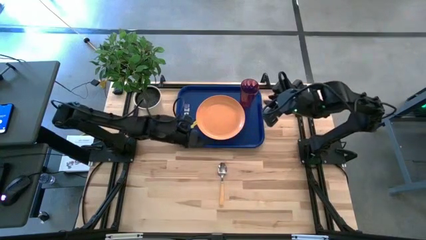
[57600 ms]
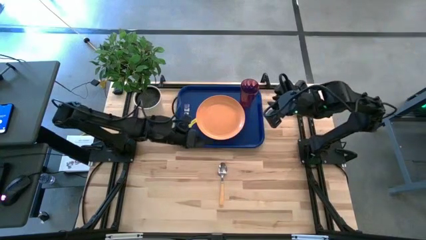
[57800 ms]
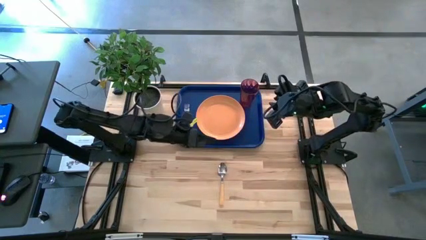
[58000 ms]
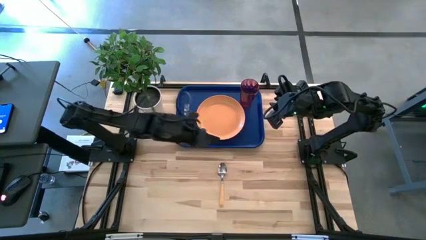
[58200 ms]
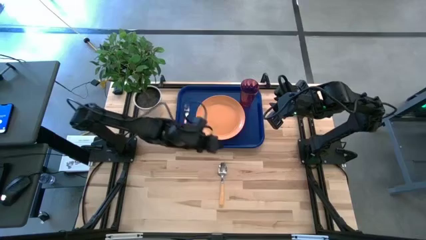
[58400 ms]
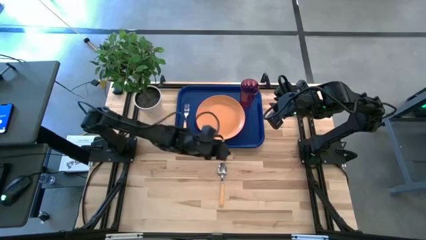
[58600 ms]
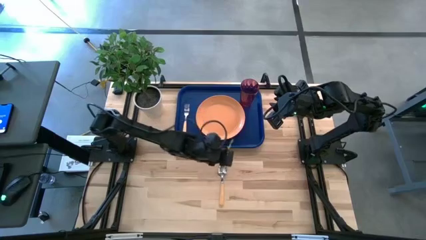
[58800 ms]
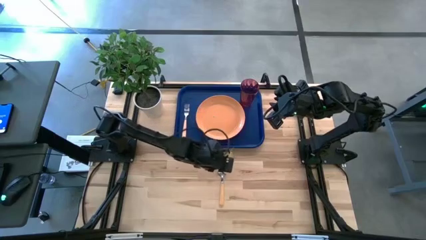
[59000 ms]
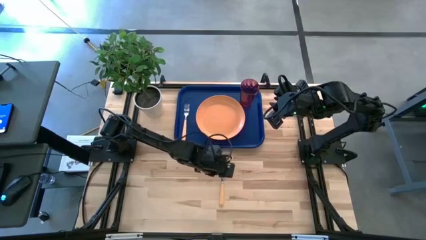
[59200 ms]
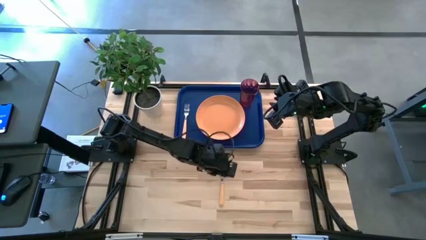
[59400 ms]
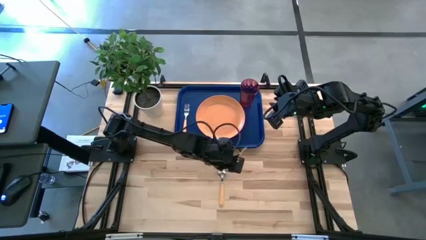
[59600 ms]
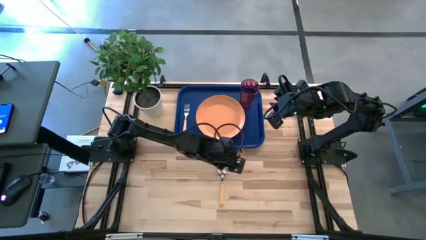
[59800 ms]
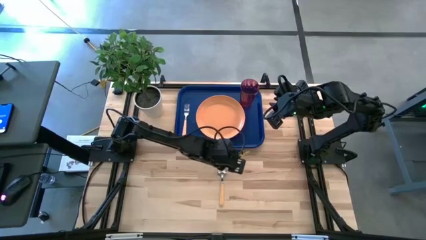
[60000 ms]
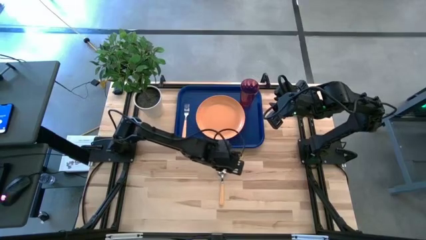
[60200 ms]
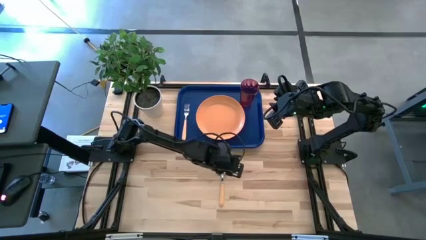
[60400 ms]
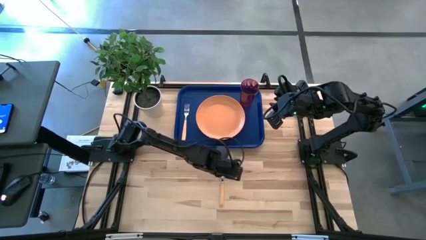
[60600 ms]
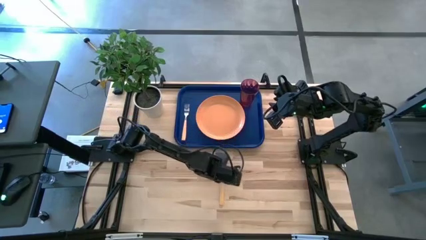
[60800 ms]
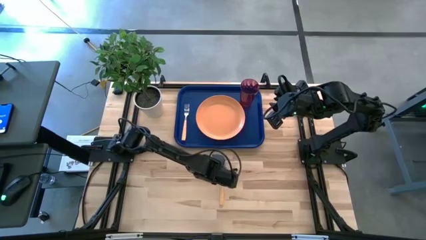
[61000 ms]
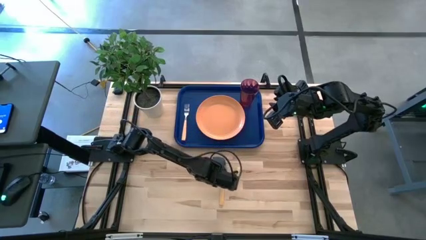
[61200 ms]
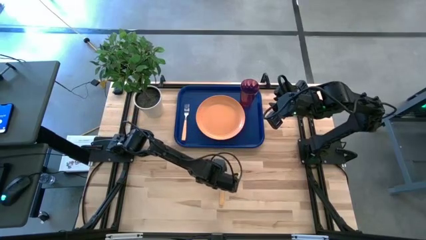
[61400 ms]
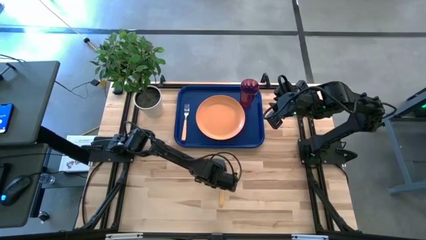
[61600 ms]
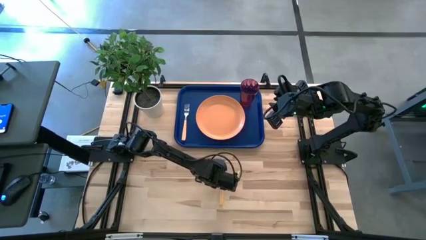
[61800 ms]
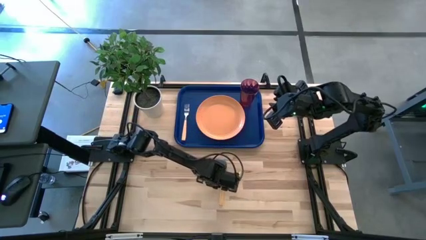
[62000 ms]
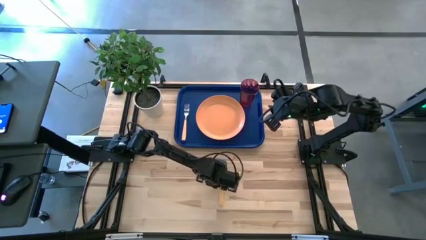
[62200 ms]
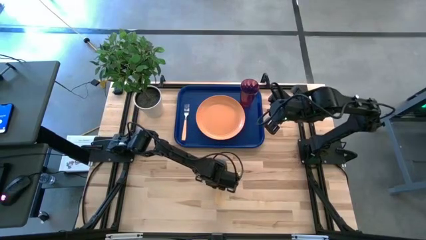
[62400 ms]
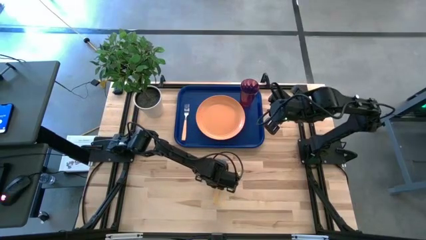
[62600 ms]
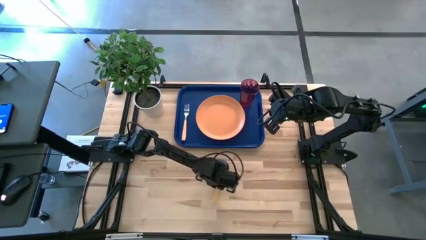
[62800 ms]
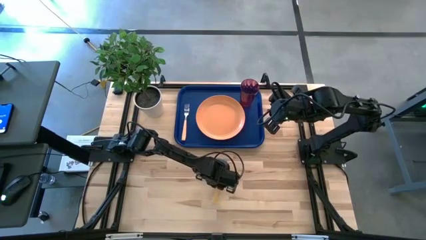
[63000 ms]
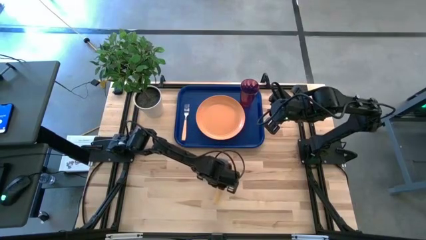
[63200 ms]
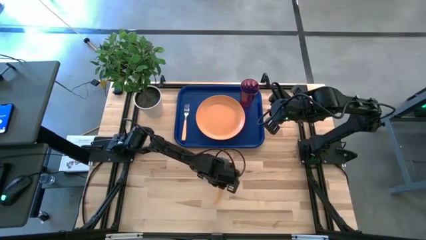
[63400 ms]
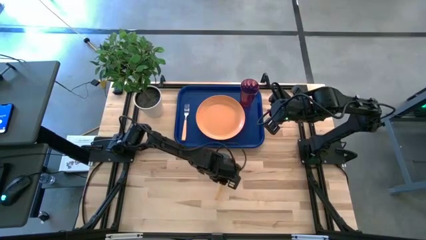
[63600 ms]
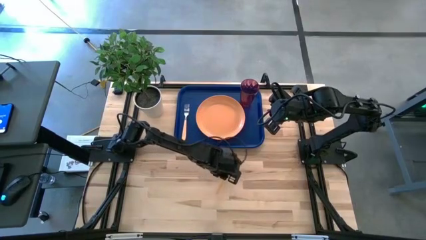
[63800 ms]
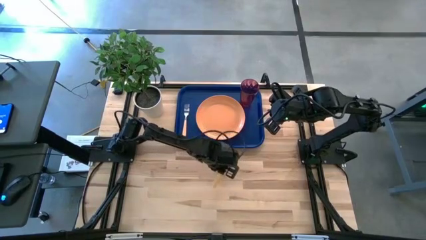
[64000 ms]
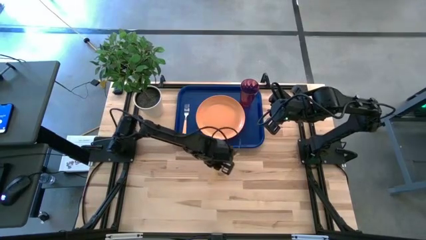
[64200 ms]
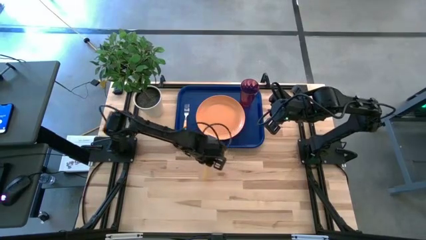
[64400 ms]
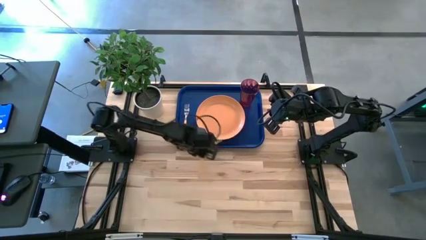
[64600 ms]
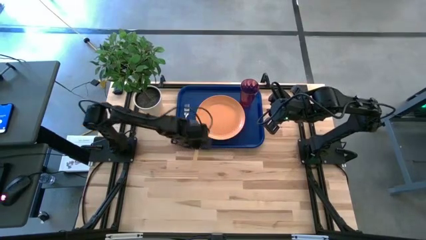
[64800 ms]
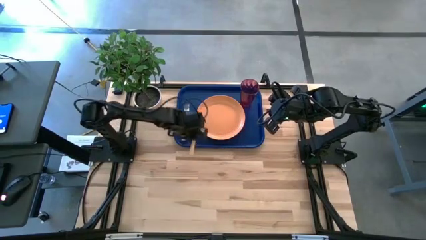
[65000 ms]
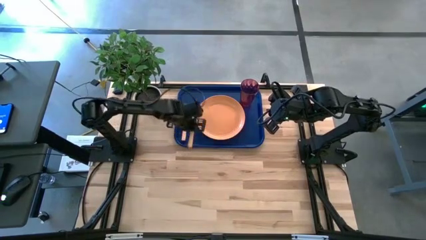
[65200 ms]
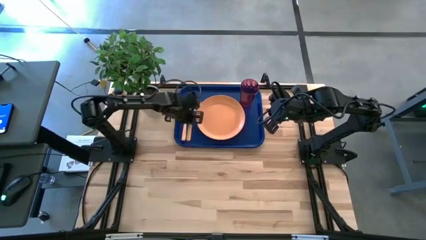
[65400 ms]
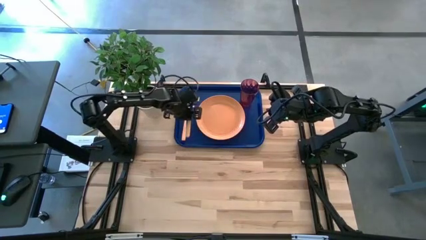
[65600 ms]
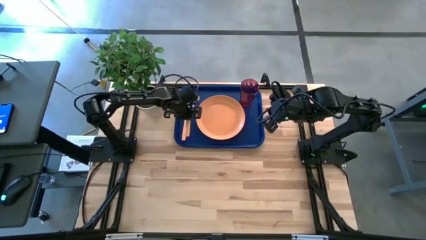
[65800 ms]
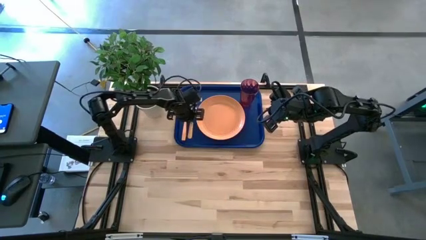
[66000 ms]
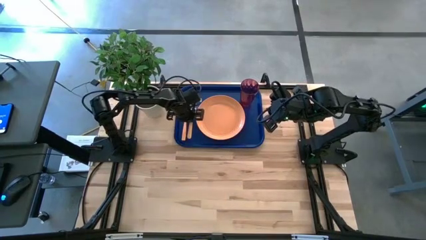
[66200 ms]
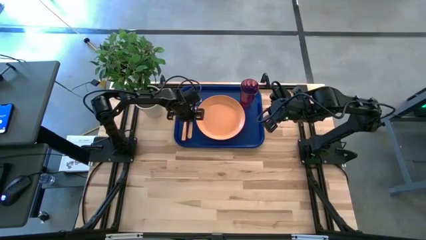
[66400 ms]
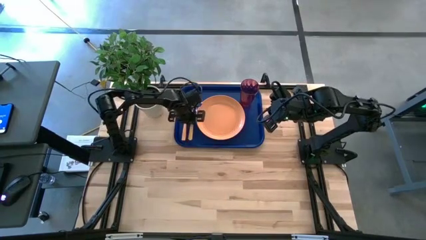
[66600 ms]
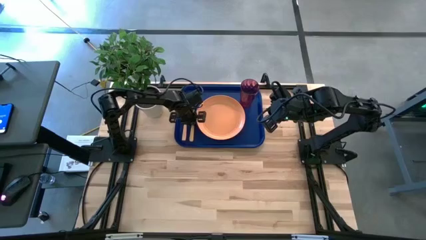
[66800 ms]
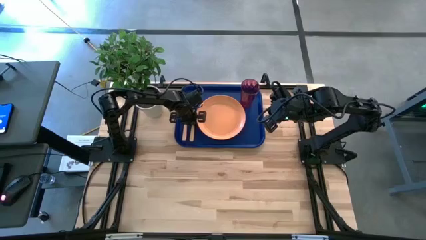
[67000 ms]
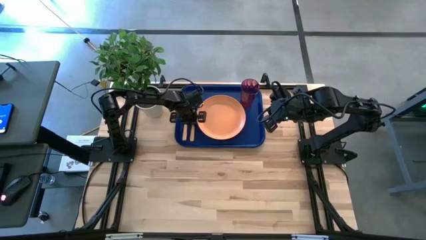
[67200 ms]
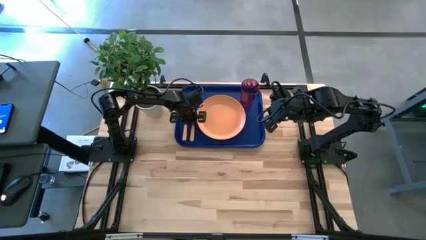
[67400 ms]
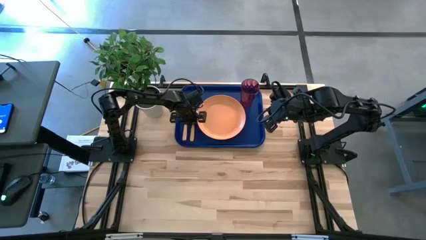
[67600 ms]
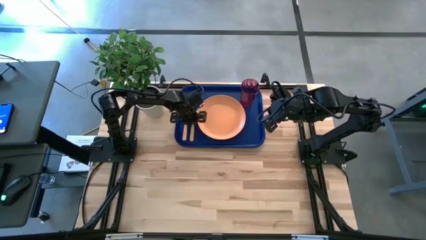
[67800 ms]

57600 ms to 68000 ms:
Task: Pick and place plate/cup/fork/spoon on tray
Put the spoon on the tray to the left of the plate

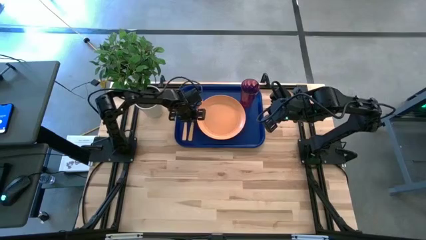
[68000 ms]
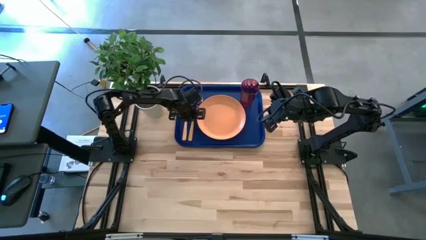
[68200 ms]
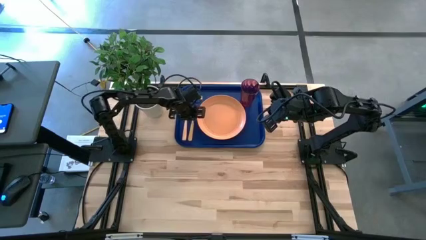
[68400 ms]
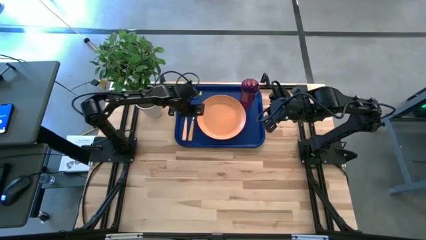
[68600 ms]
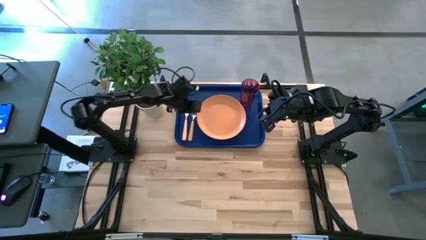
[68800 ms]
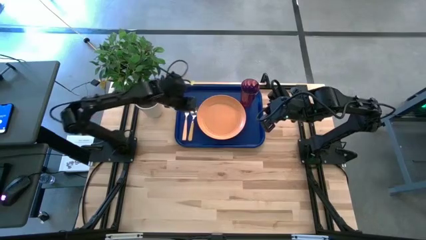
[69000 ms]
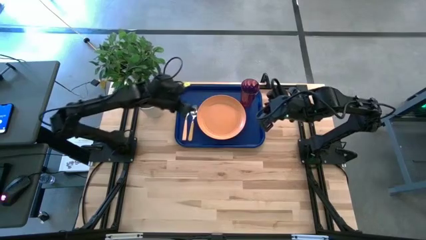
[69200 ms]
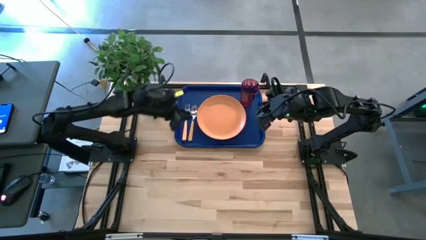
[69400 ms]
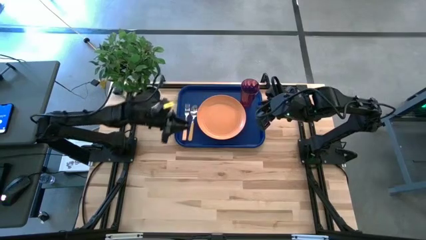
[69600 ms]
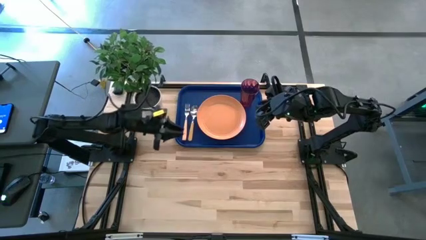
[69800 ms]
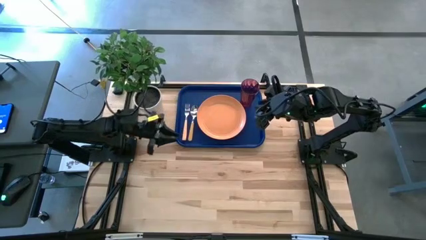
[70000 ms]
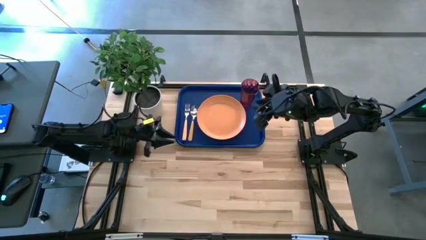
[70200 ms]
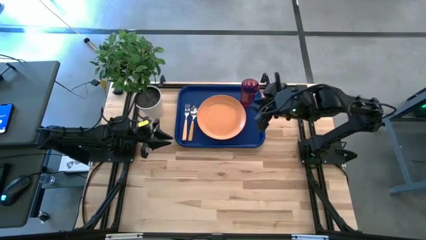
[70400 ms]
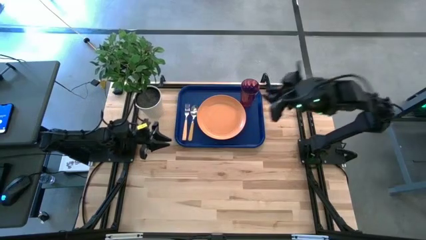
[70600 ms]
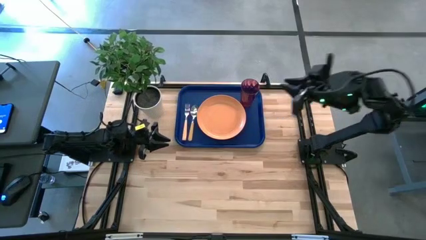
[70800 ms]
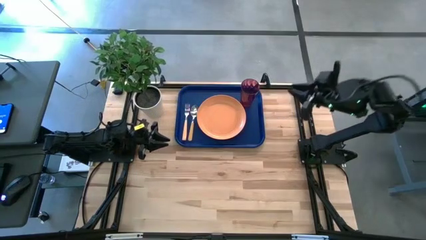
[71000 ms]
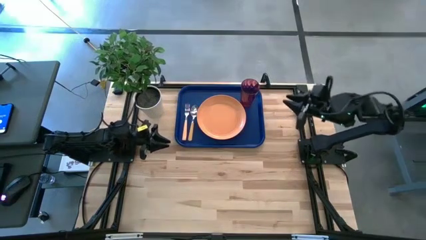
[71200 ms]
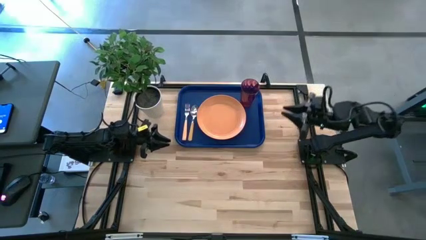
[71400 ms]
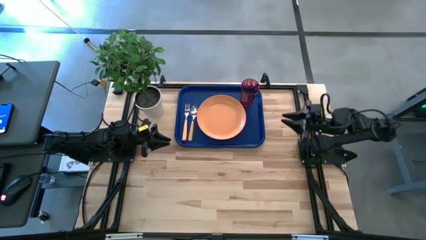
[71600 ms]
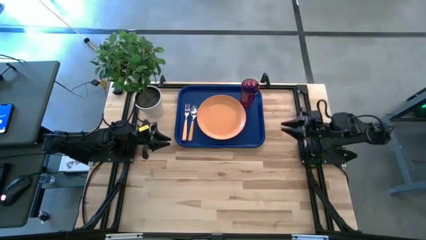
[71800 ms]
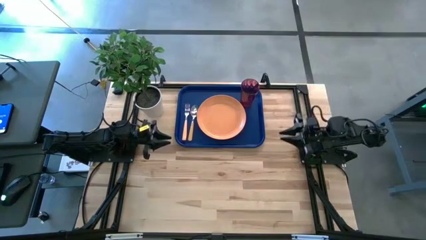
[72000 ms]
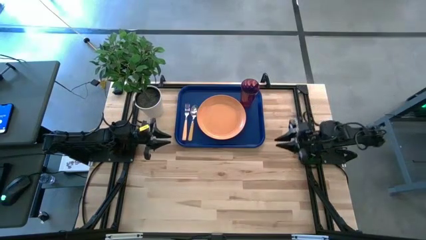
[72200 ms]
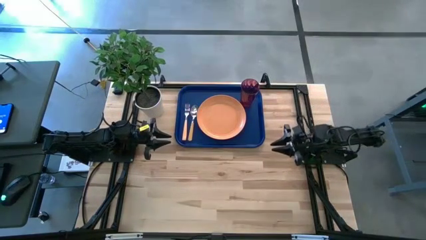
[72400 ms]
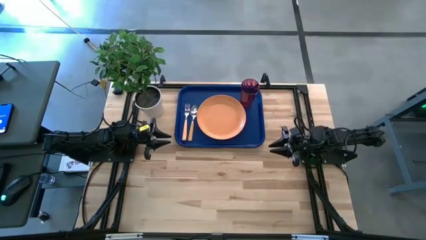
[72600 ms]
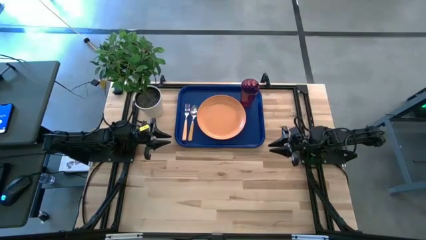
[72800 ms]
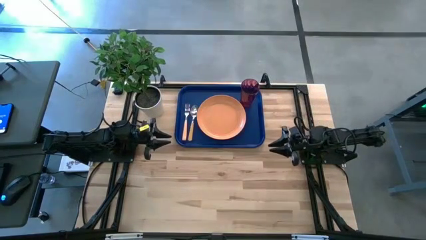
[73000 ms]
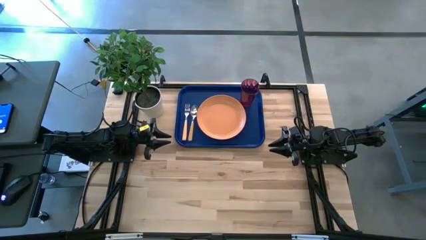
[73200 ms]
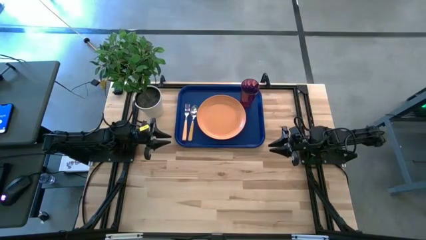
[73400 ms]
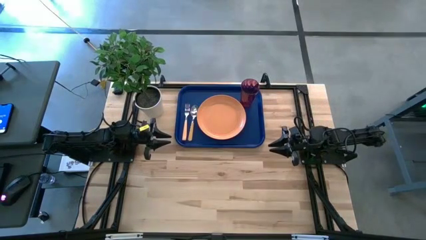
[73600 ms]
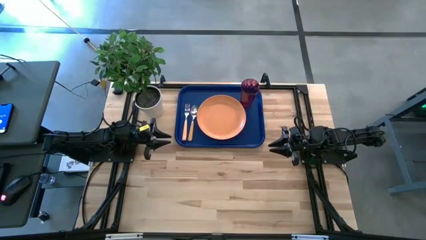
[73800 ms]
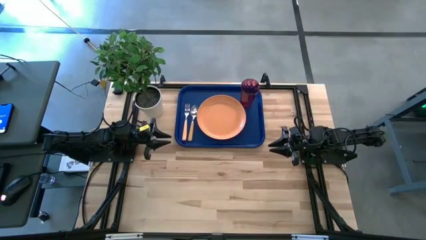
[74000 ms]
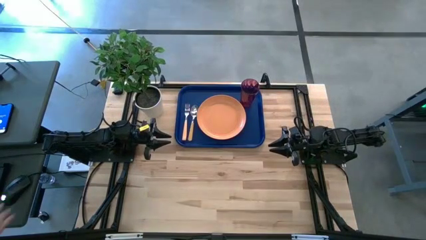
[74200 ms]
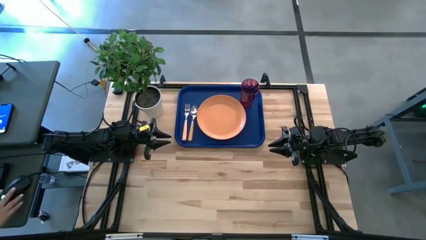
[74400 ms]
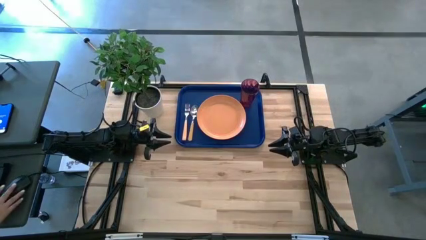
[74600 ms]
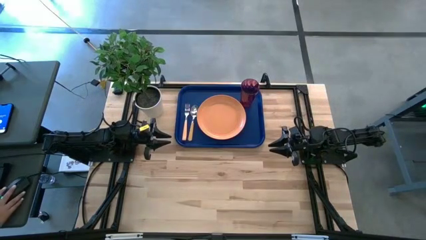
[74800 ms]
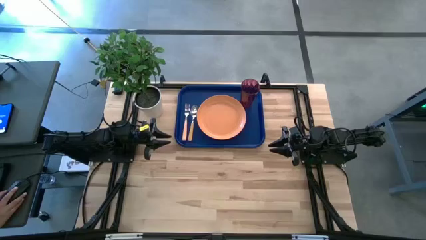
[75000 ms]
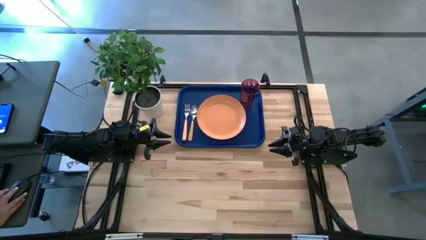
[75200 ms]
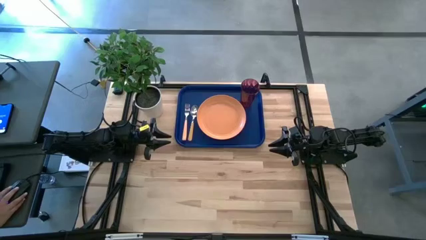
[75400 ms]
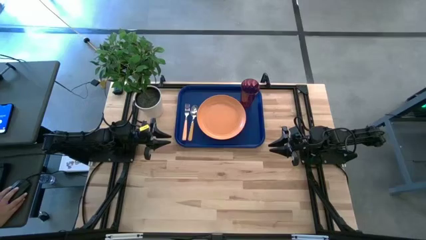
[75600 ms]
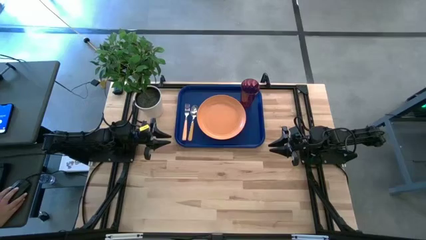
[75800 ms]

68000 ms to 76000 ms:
Return to Home Position
